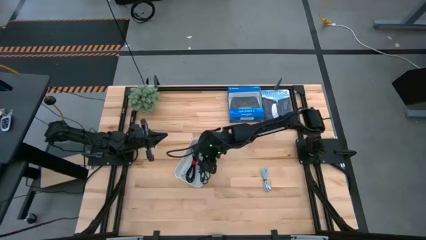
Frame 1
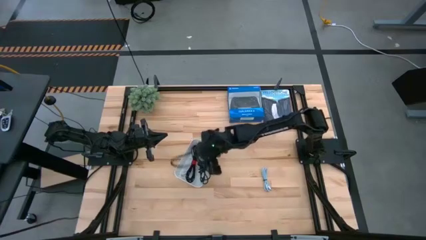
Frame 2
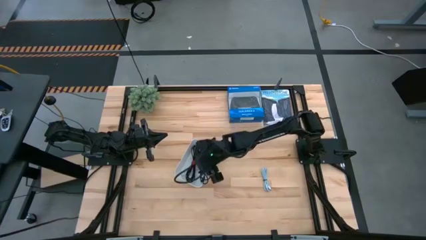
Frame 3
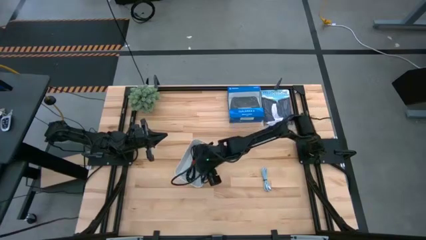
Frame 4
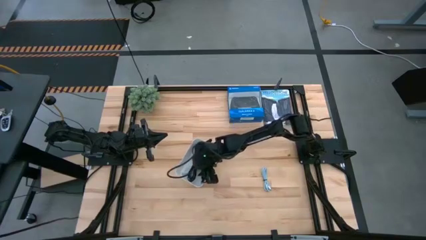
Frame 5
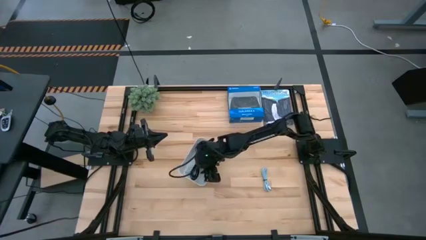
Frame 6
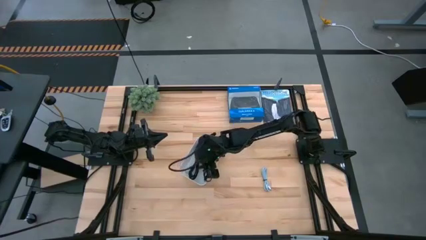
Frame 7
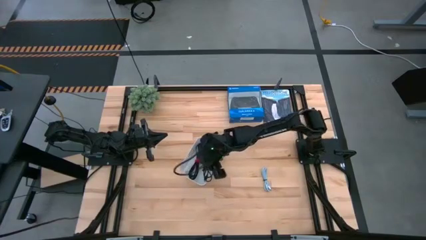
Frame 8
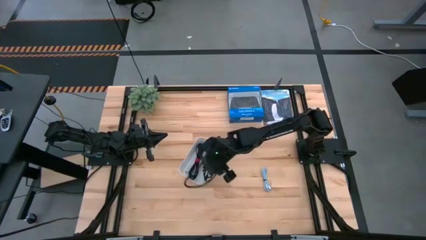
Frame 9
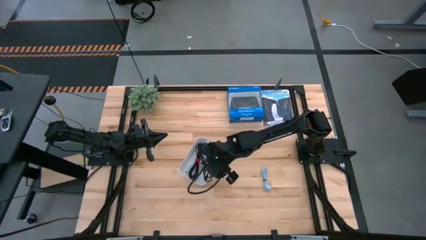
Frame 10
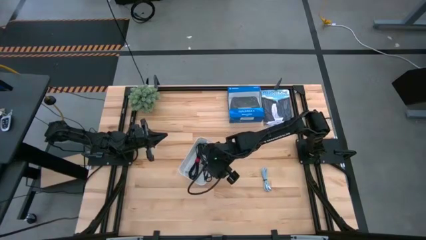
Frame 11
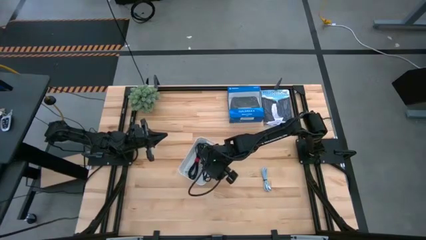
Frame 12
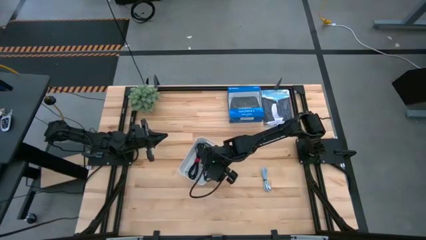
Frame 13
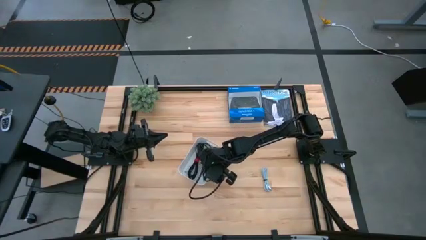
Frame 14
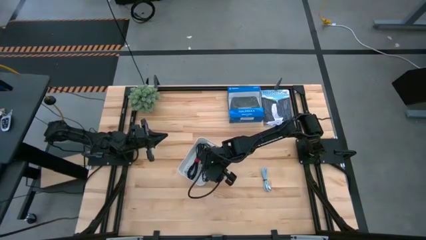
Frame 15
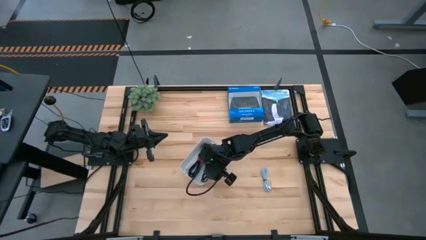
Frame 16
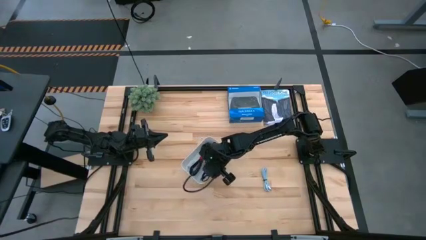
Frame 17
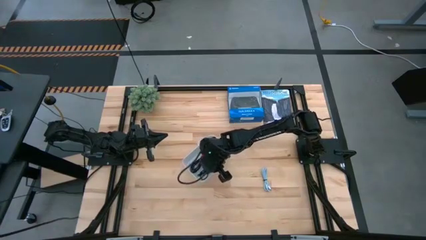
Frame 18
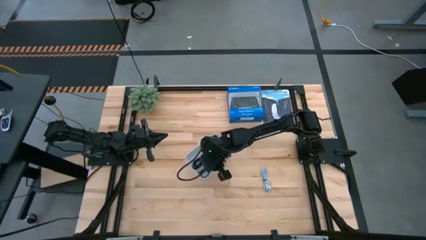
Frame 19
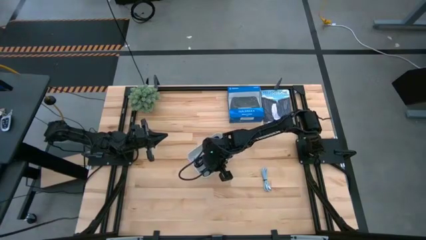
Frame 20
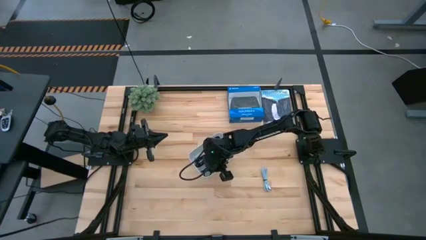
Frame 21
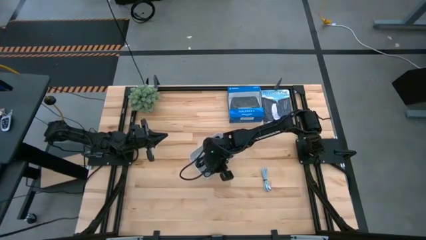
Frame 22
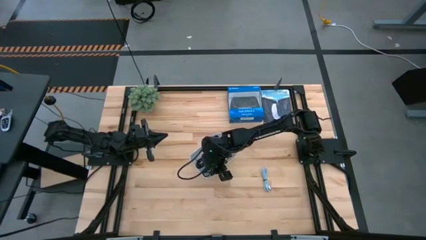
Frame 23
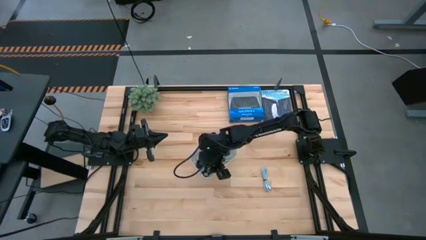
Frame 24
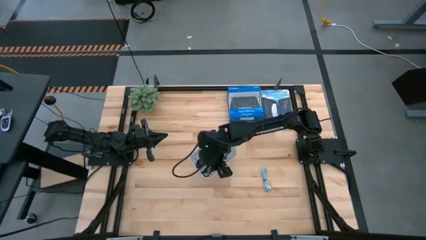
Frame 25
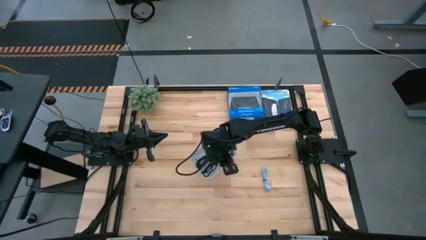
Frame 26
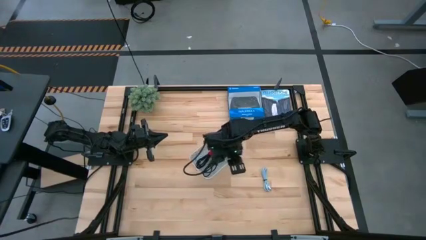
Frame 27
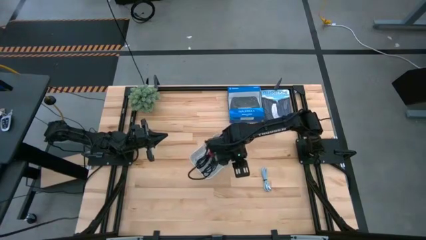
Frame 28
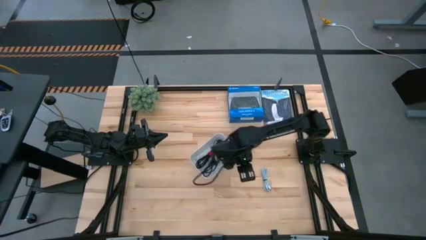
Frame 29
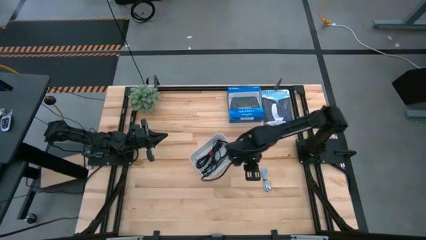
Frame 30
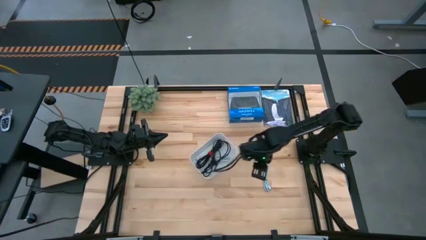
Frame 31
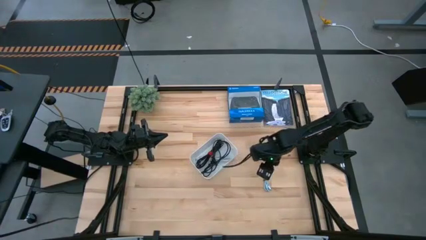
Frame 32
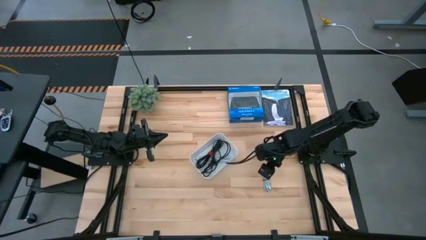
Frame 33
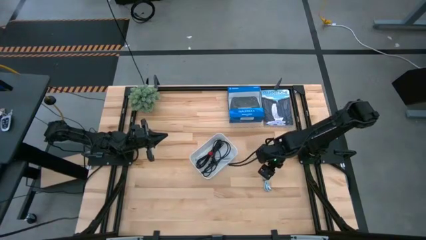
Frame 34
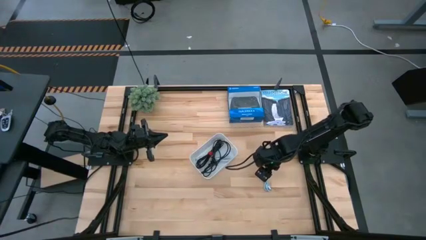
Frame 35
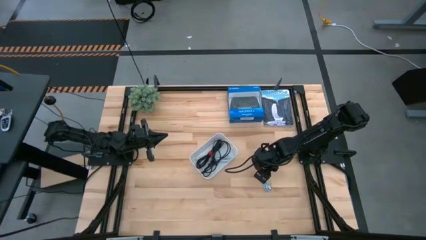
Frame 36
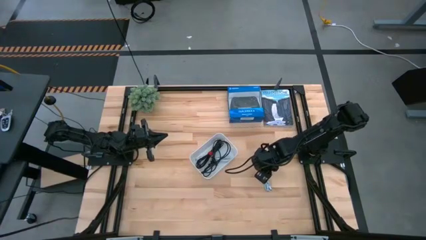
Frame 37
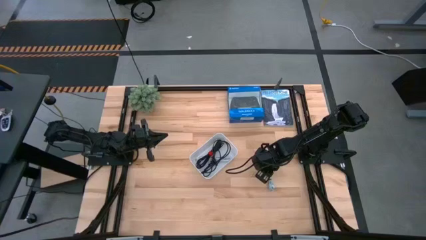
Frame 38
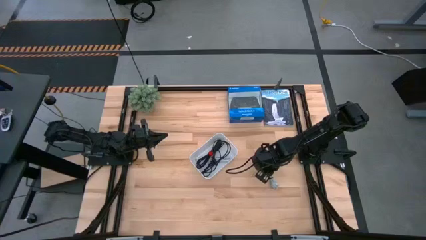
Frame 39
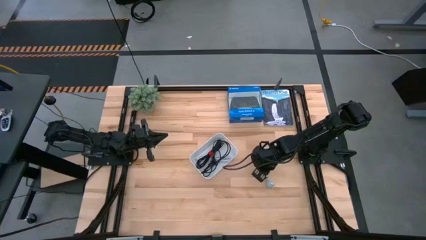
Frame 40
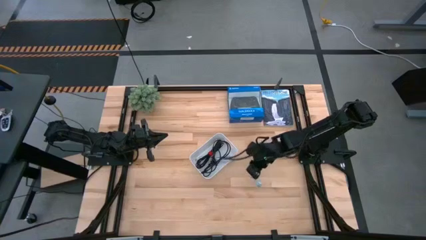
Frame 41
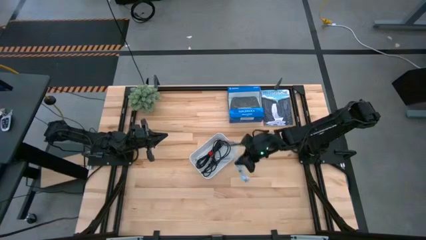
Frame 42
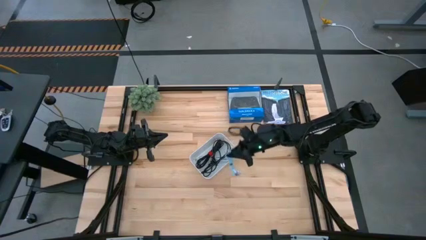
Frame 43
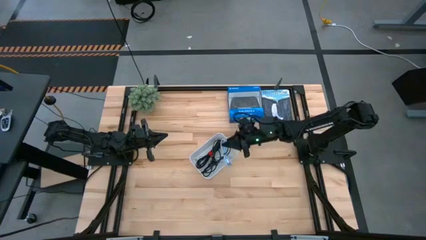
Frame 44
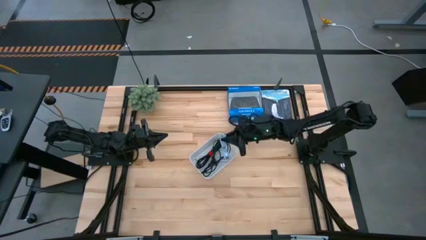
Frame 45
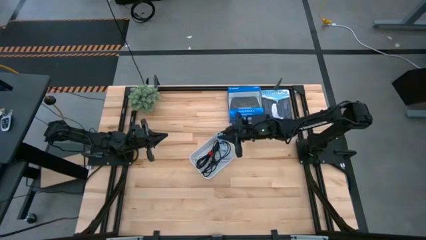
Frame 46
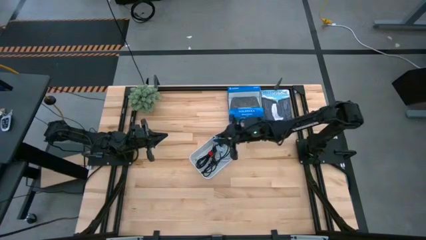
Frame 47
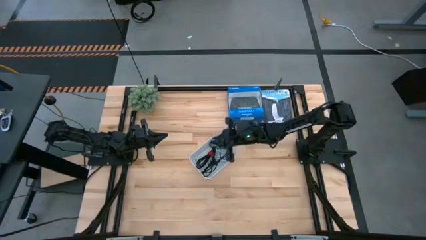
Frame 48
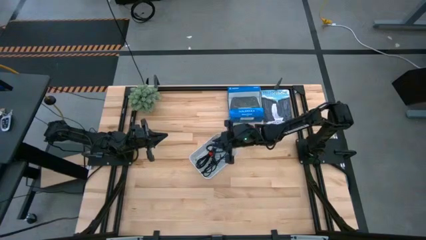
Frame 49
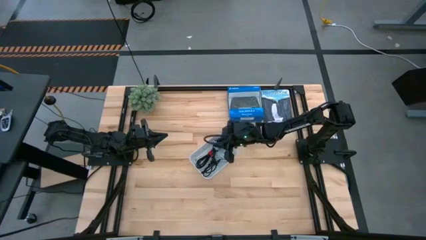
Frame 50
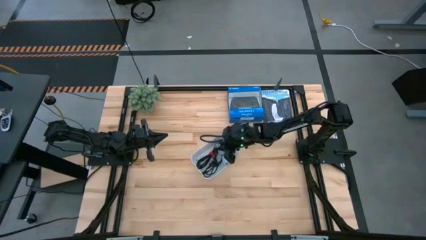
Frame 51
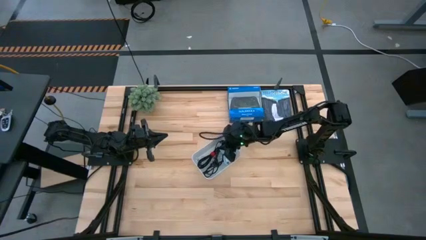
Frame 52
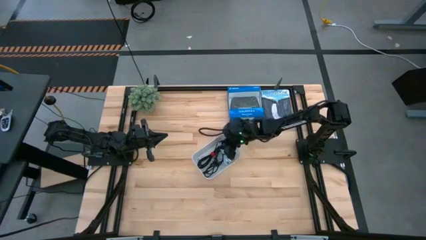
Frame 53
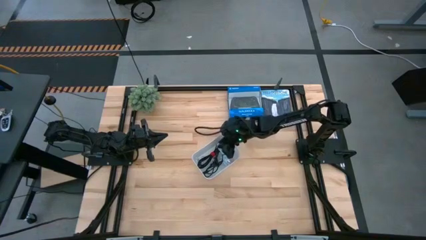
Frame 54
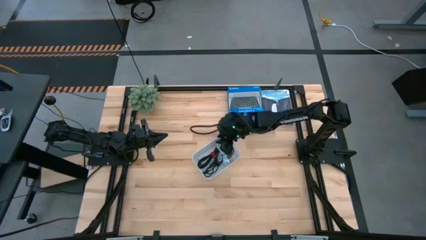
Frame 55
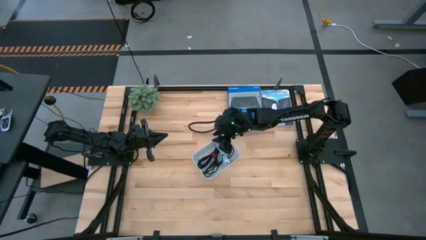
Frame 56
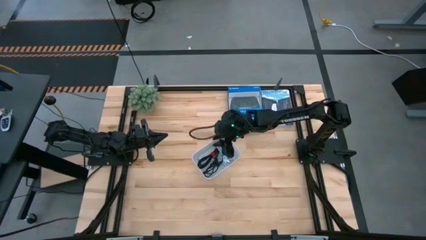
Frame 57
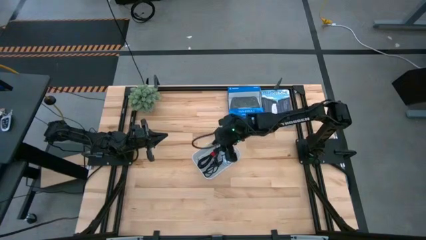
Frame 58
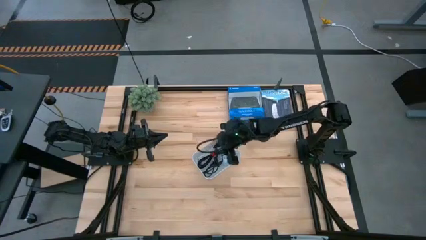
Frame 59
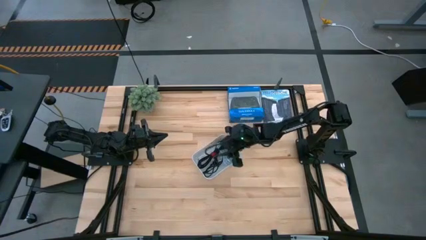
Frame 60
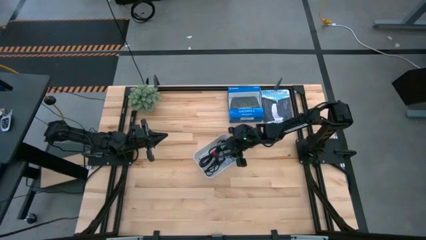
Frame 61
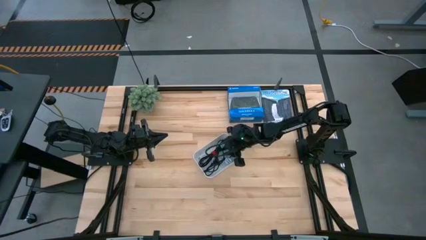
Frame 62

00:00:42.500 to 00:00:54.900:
Task: Pick and place USB-C Cables
Put the blue USB cable into the white bin
